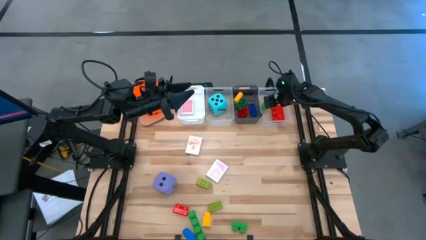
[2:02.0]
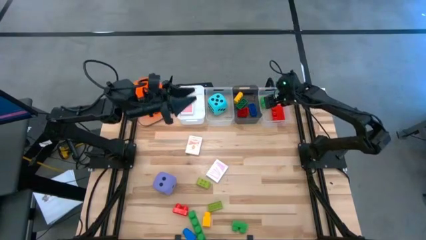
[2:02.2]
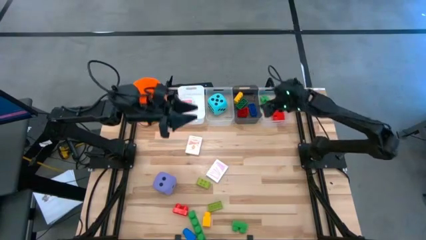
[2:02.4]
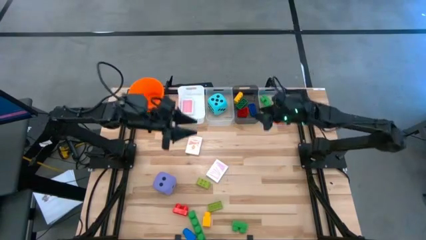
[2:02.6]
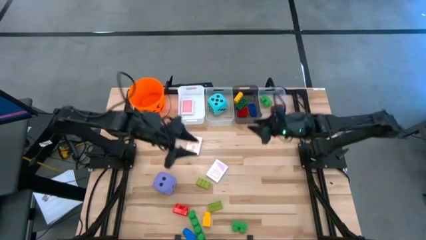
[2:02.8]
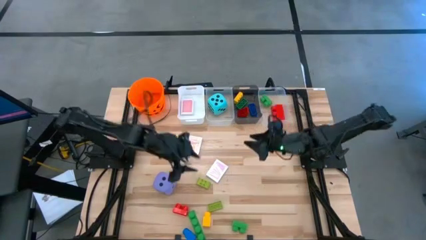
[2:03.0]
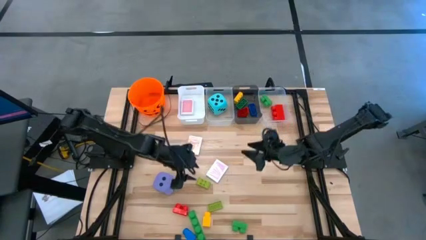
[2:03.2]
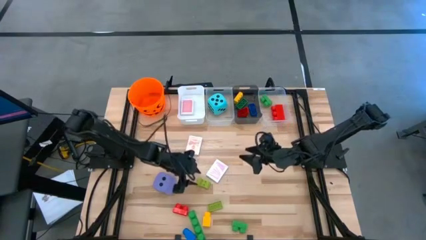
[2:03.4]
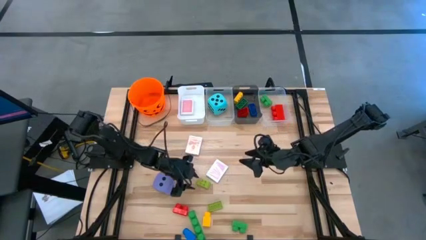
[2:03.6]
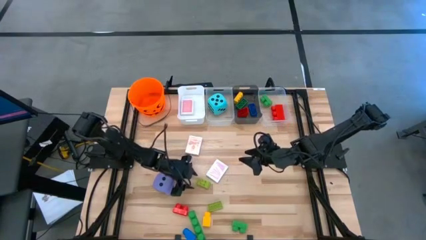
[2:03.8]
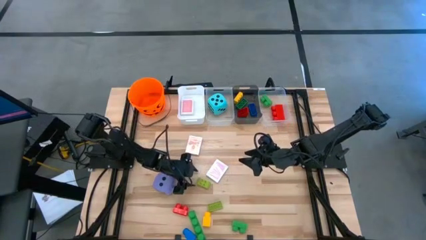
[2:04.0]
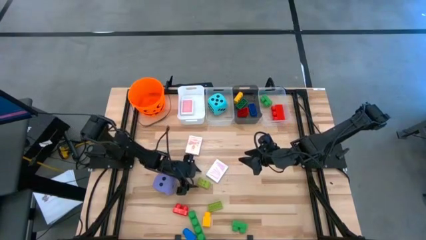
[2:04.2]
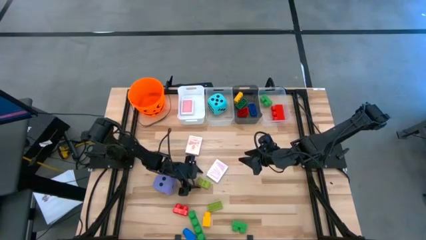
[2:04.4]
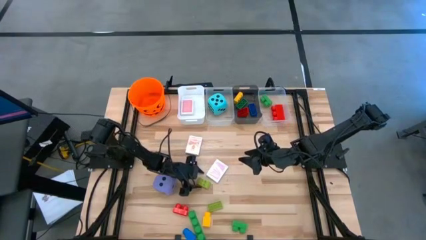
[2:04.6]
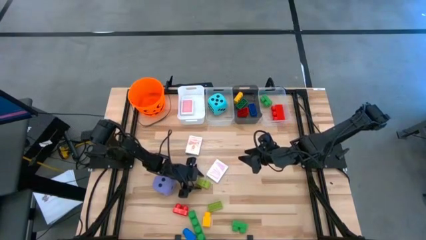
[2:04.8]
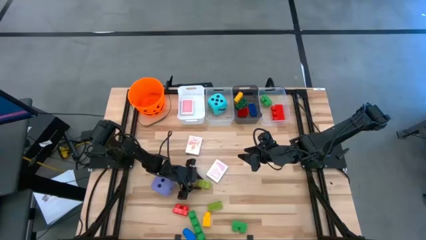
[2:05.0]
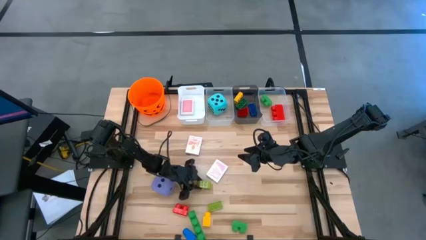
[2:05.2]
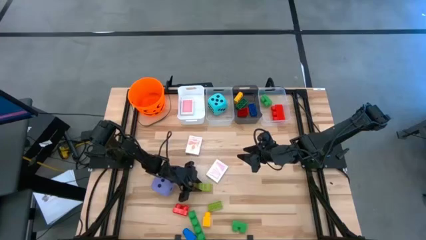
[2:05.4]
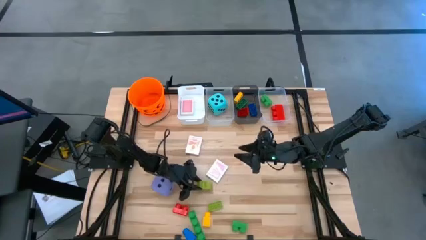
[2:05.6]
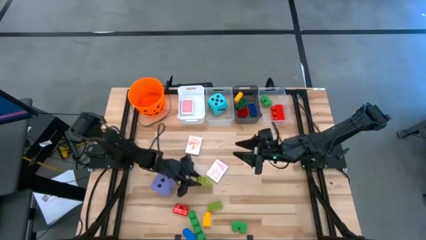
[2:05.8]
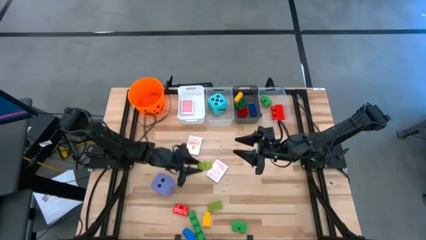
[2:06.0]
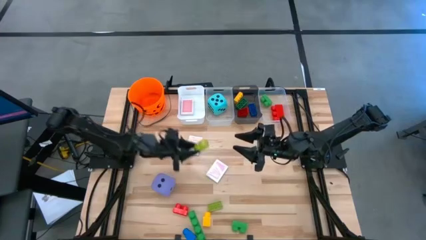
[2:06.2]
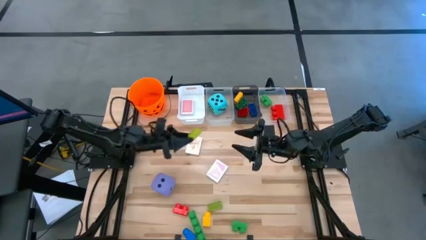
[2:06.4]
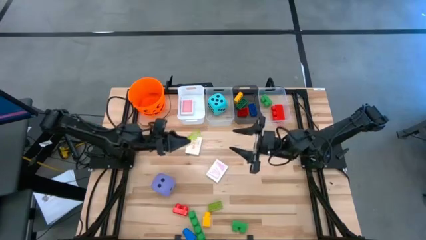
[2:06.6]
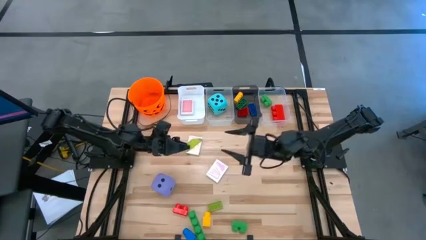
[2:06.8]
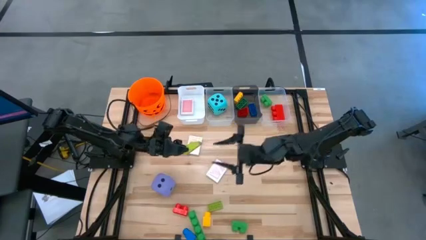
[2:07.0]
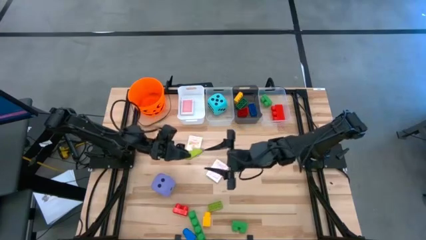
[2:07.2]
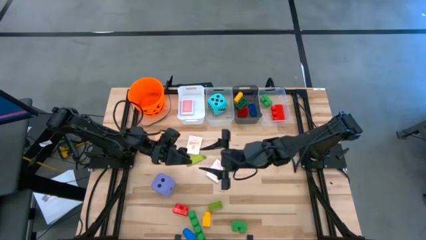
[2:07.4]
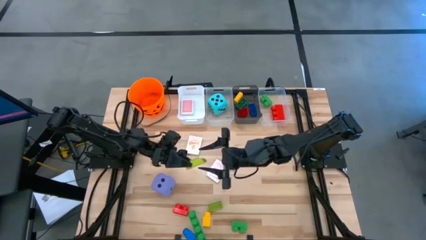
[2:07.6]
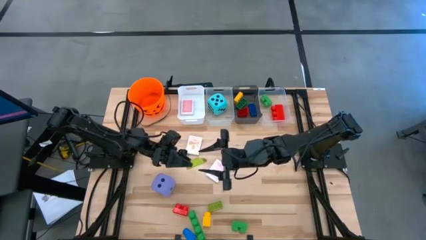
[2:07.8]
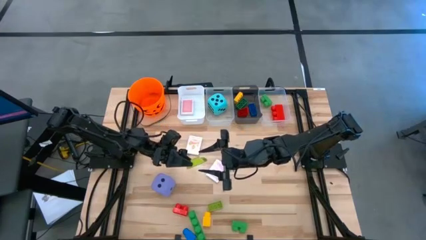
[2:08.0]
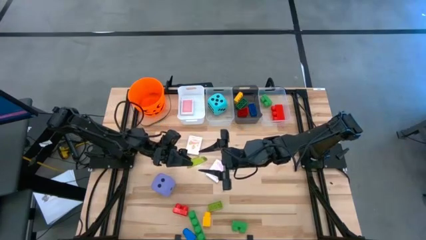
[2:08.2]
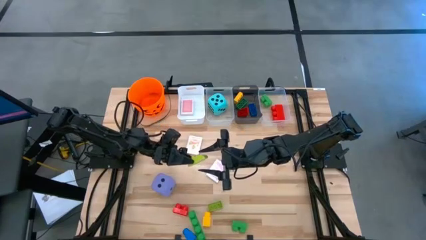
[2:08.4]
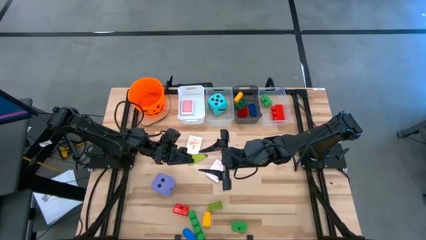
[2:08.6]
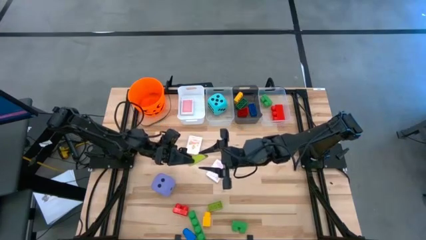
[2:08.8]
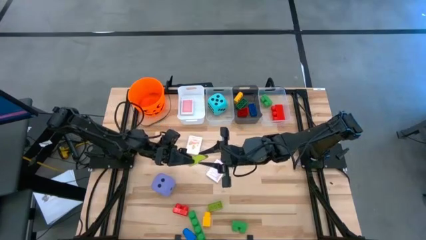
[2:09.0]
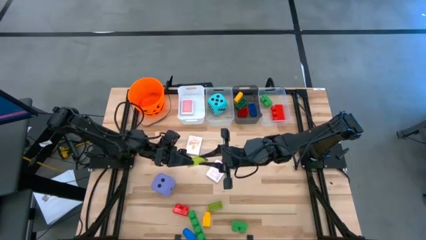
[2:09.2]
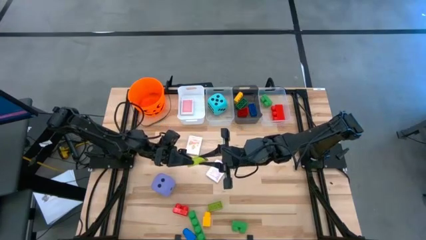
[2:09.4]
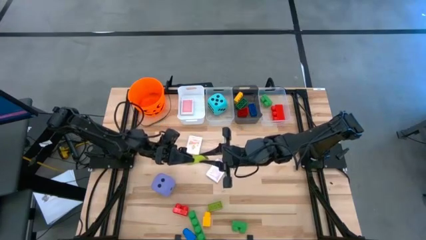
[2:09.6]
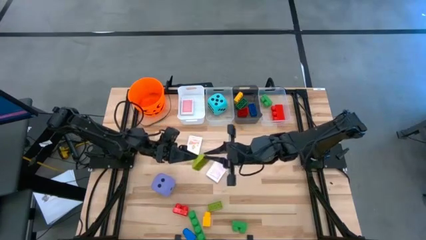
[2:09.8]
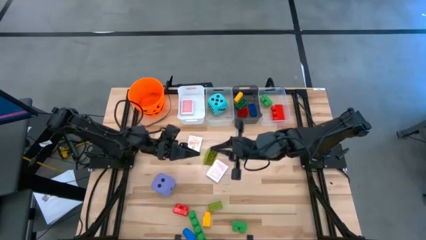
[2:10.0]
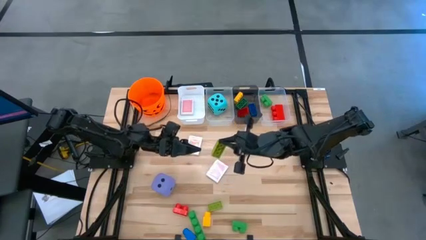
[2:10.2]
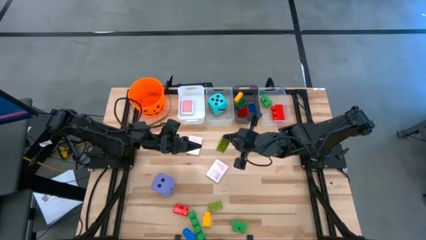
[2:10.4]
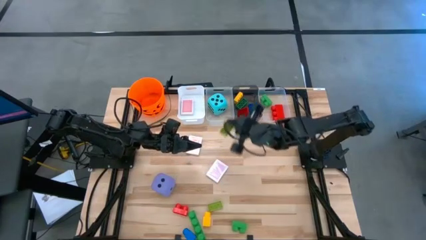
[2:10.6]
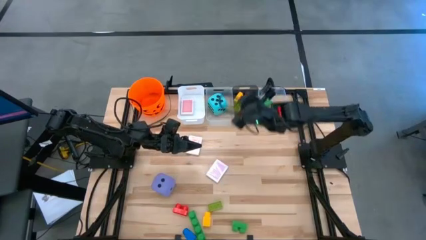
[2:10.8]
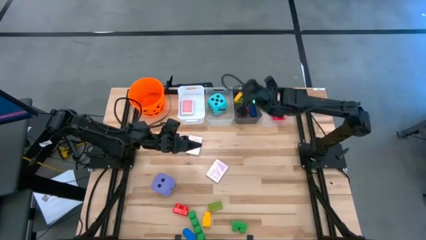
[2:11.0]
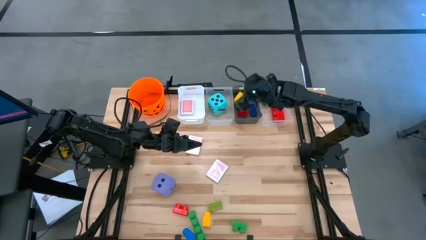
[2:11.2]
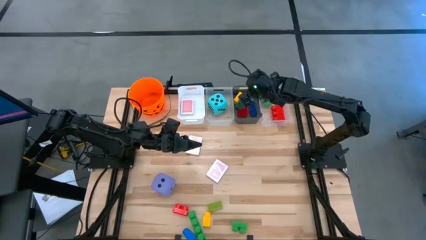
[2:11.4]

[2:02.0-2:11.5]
Task: Pick & Place Toys
Put the small green game piece into the black bin

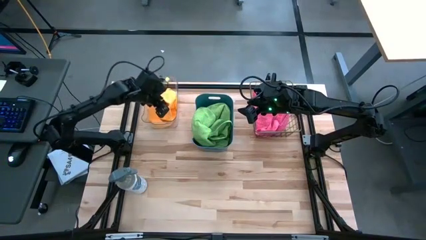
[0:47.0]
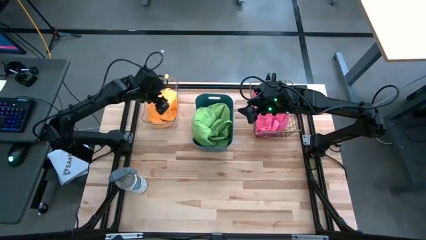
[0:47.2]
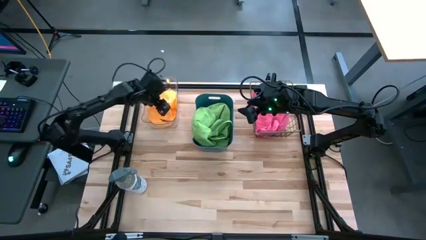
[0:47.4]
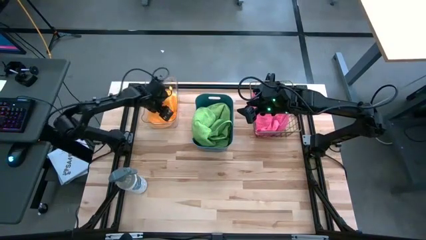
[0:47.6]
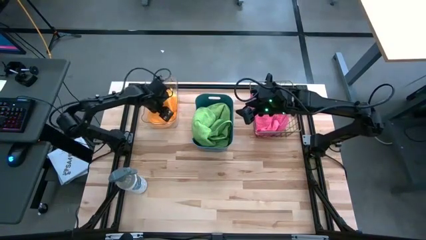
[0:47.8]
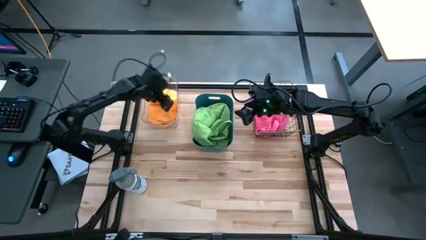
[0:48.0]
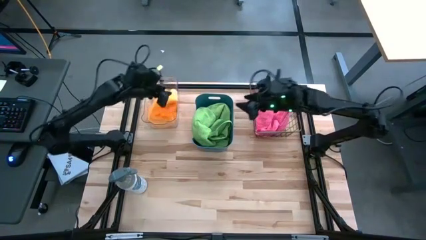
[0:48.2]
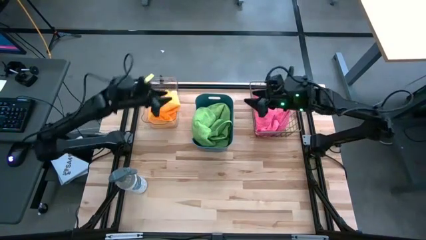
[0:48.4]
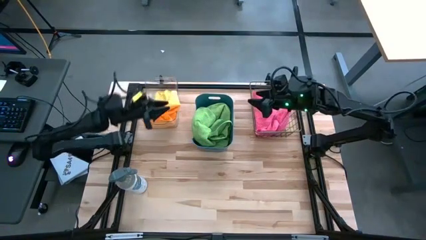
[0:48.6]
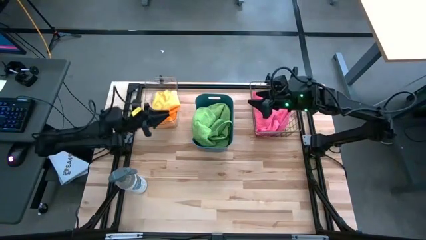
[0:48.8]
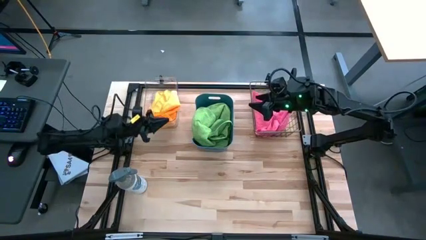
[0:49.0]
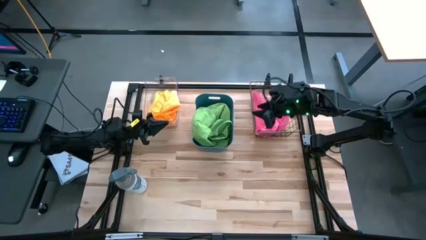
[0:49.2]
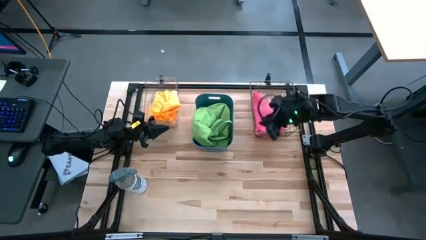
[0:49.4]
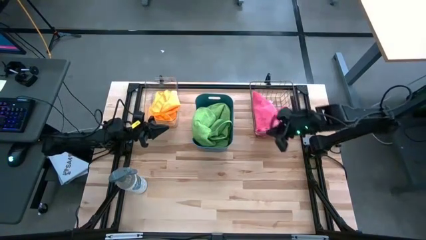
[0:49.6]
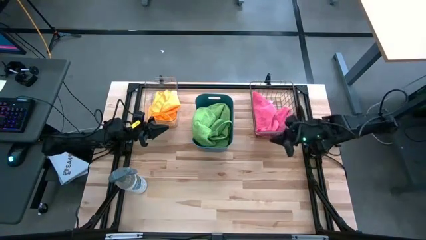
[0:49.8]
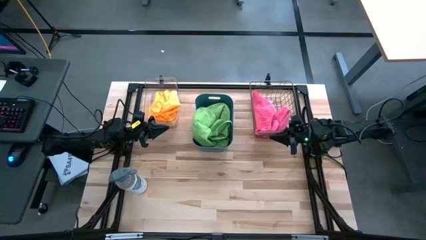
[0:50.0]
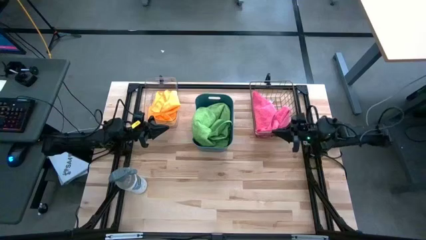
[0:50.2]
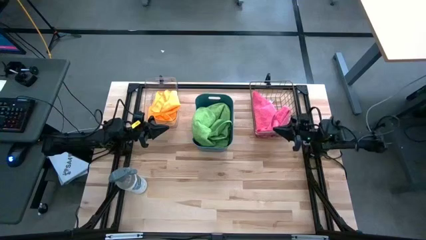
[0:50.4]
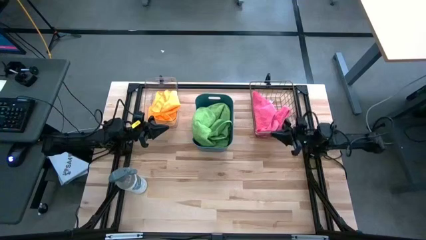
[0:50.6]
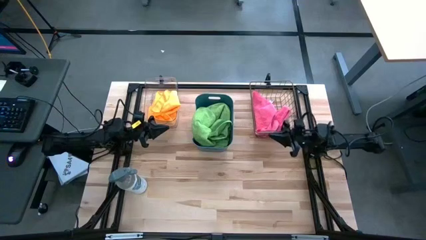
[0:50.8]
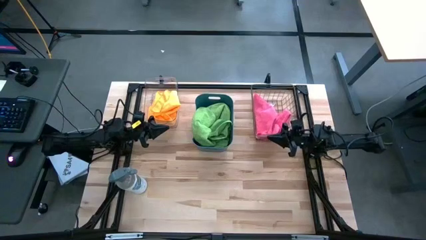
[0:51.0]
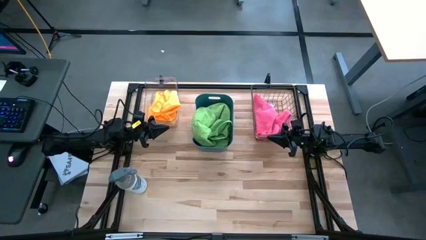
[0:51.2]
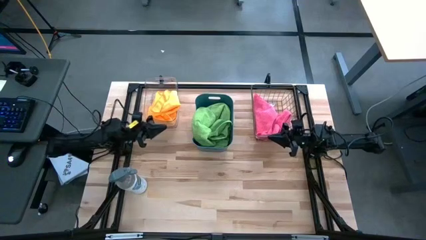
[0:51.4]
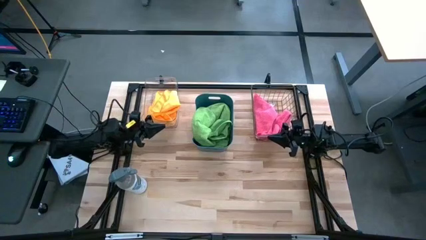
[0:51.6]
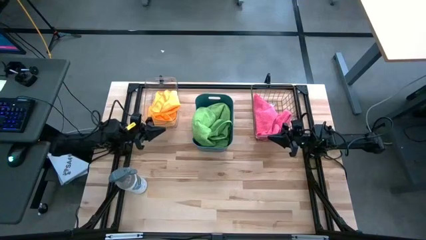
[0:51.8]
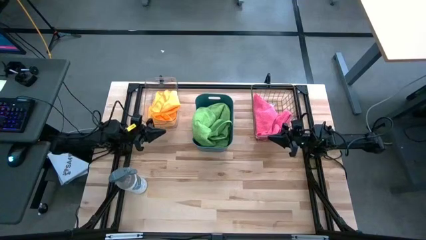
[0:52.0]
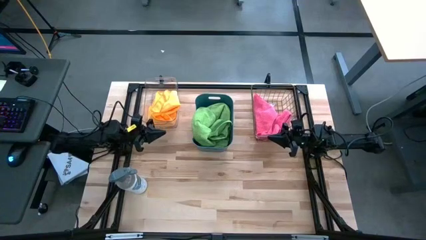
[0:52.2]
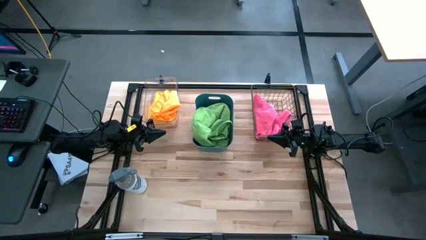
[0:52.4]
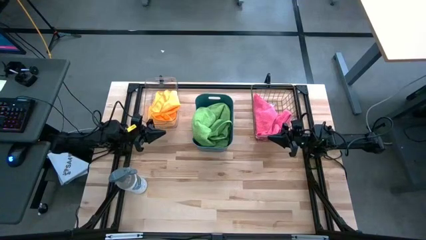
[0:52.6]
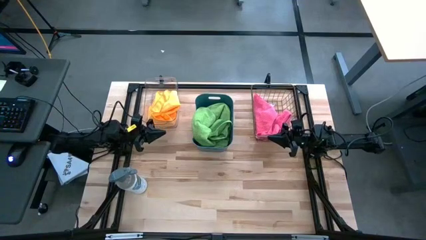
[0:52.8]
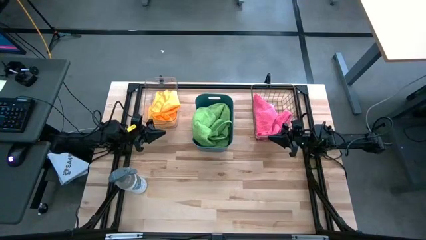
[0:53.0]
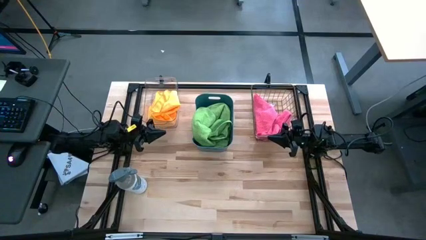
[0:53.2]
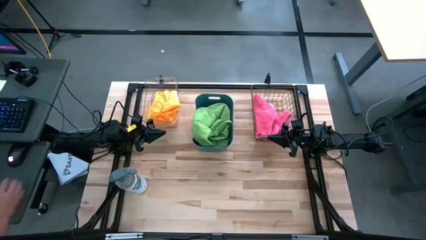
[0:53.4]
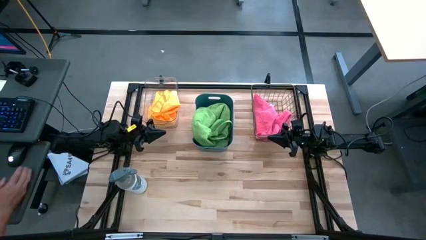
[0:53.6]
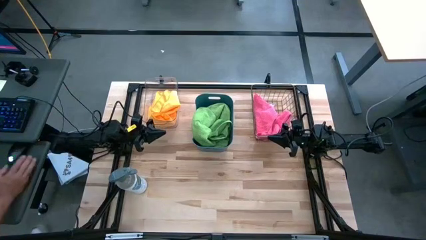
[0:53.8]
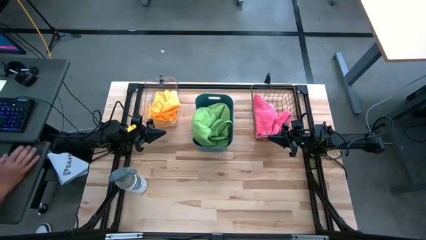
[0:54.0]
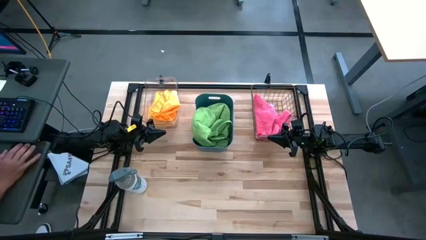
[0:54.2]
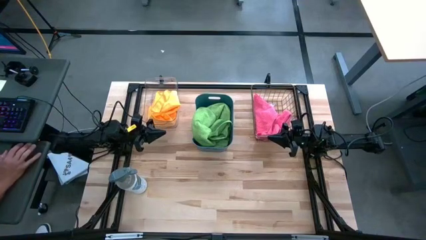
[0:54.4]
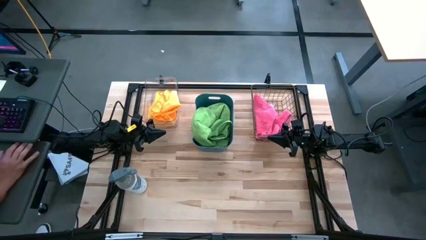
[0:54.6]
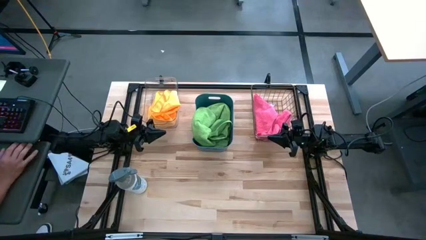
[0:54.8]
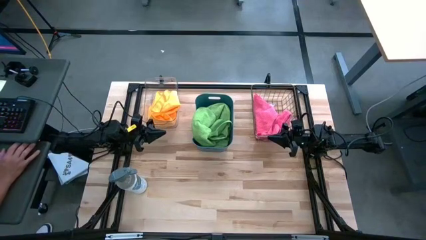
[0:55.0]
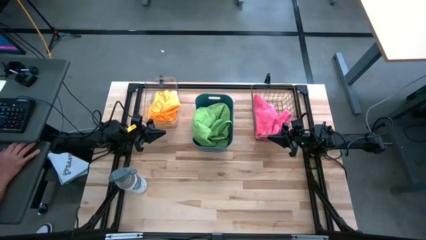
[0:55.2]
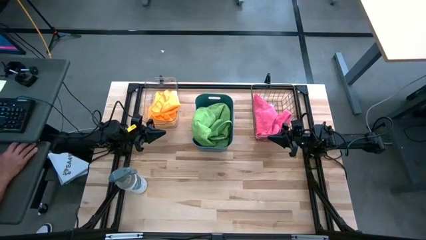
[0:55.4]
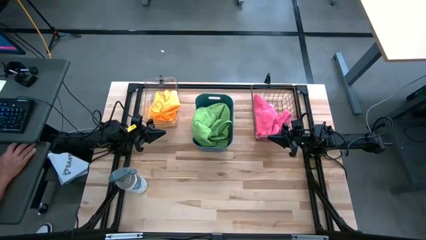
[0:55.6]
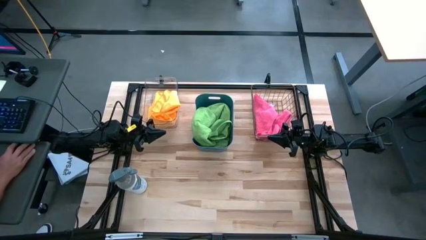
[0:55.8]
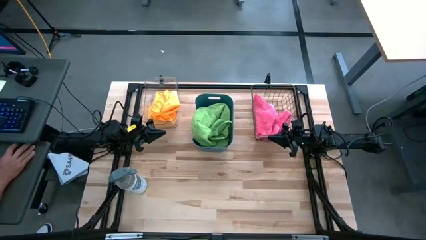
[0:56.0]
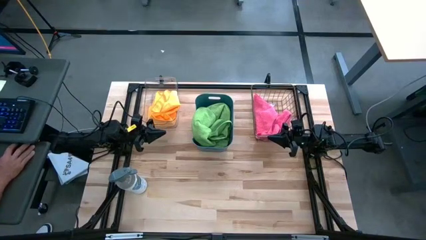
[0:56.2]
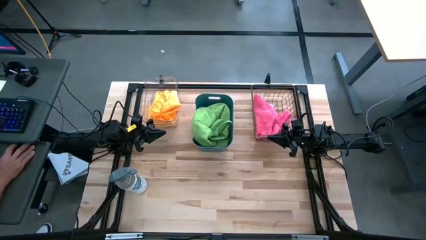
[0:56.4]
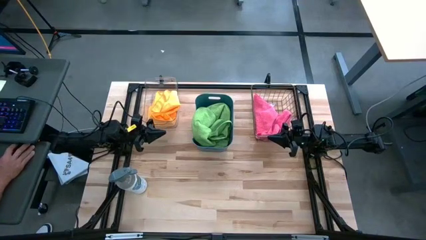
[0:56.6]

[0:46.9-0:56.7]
Task: Sort microfiber towel by color & place in baskets
Return to Home Position
